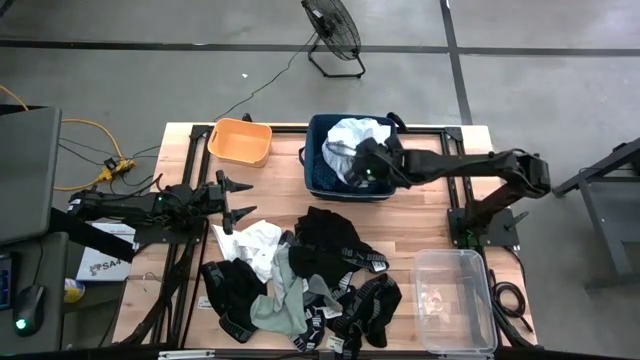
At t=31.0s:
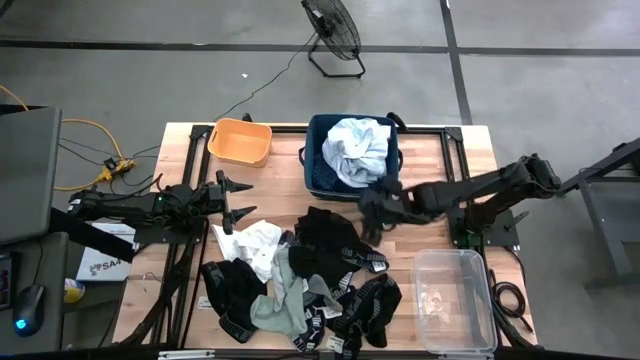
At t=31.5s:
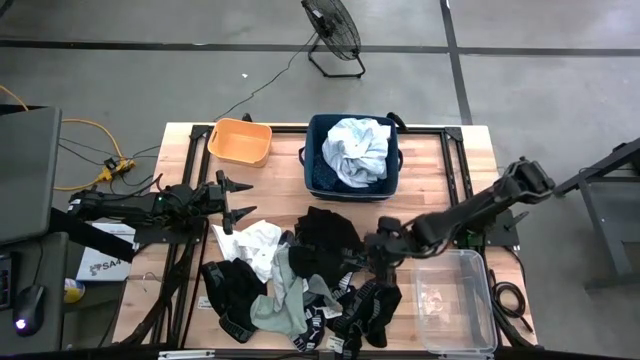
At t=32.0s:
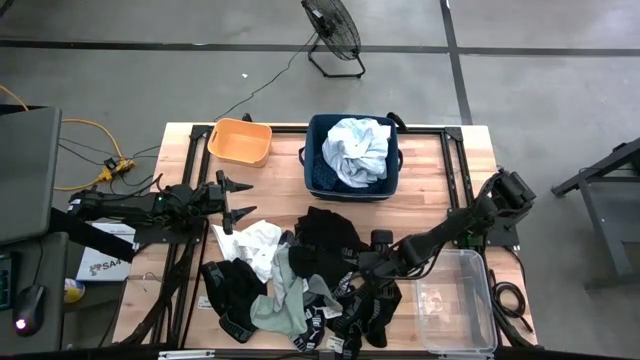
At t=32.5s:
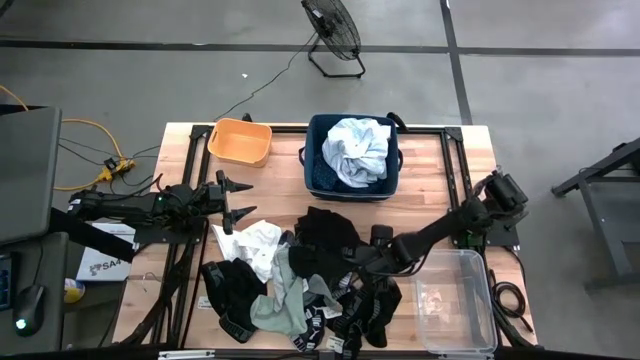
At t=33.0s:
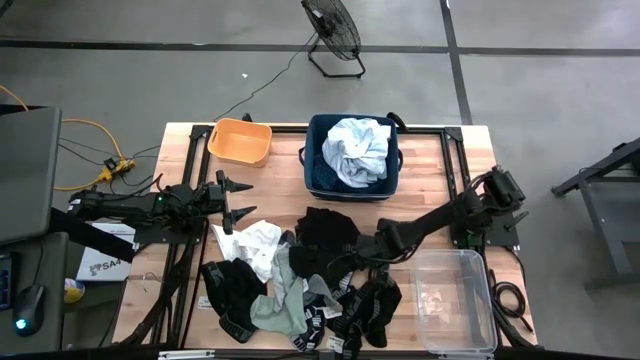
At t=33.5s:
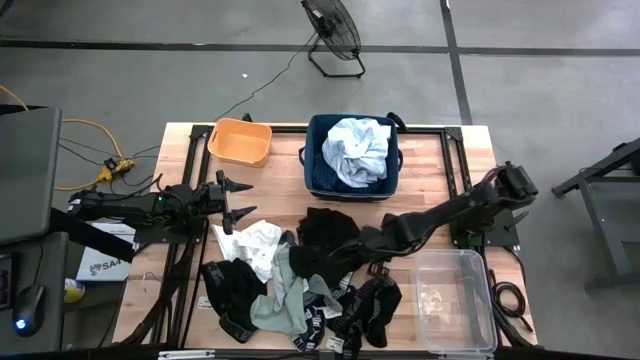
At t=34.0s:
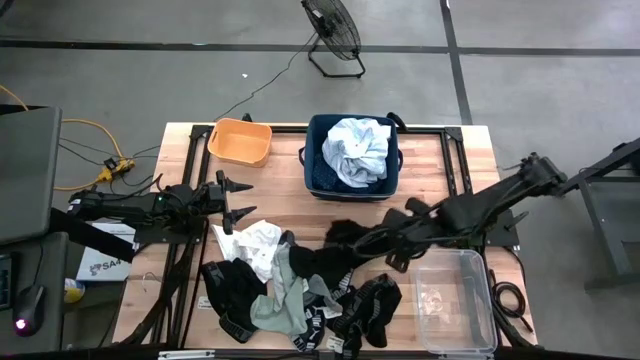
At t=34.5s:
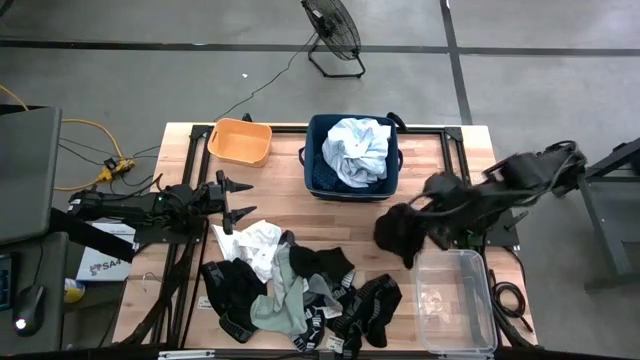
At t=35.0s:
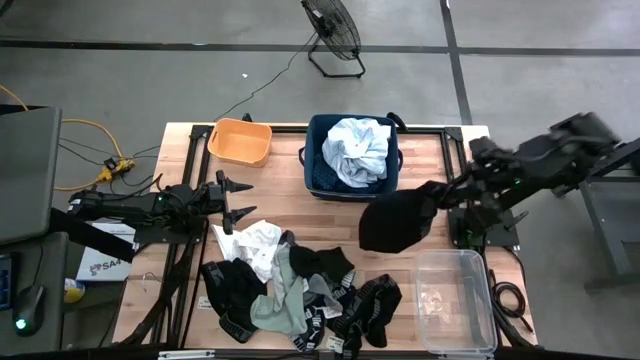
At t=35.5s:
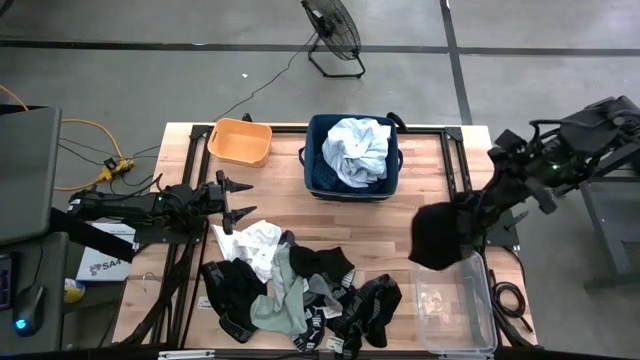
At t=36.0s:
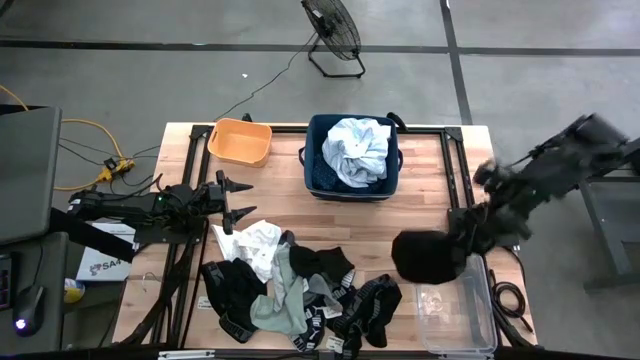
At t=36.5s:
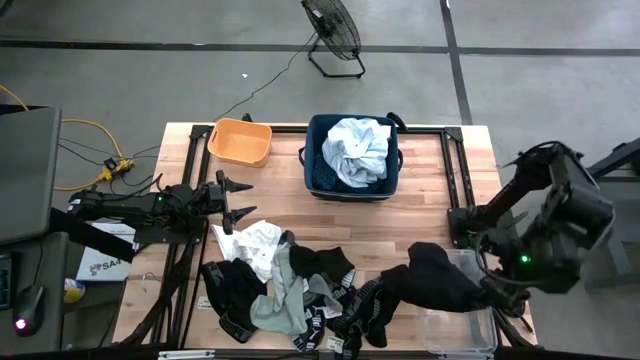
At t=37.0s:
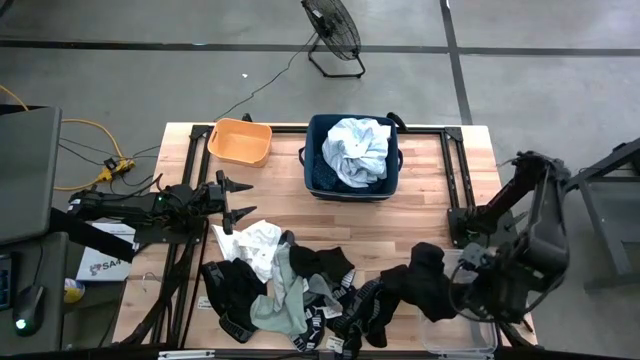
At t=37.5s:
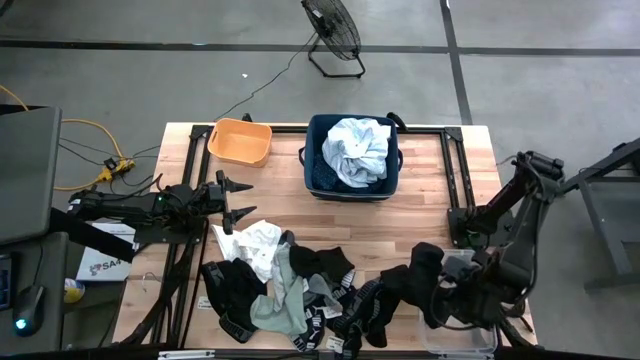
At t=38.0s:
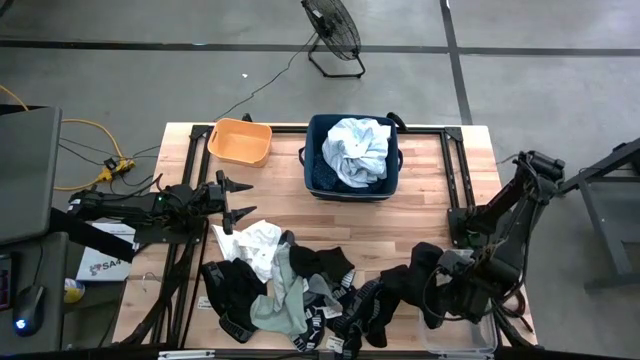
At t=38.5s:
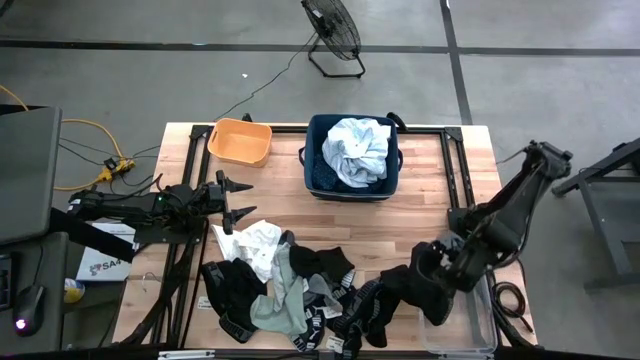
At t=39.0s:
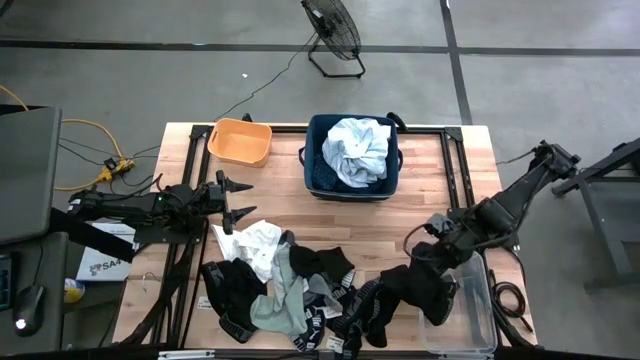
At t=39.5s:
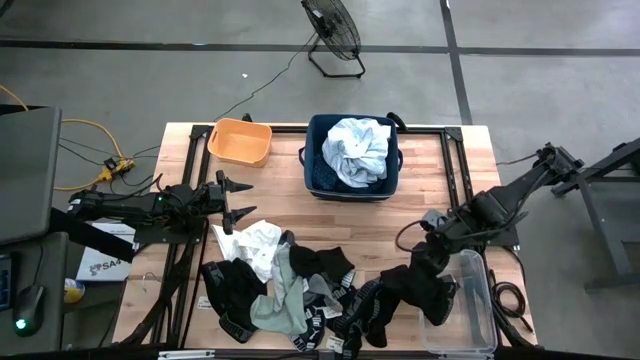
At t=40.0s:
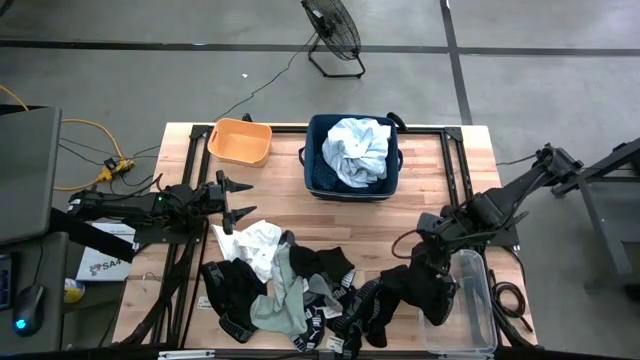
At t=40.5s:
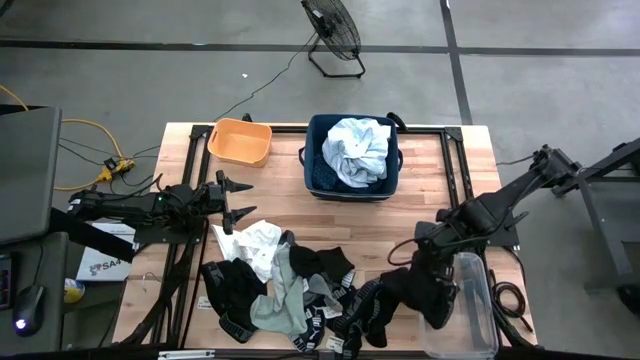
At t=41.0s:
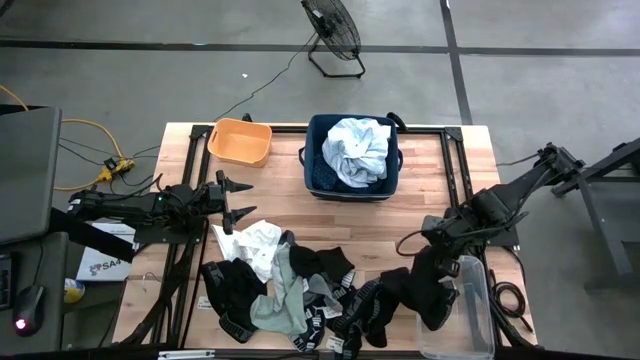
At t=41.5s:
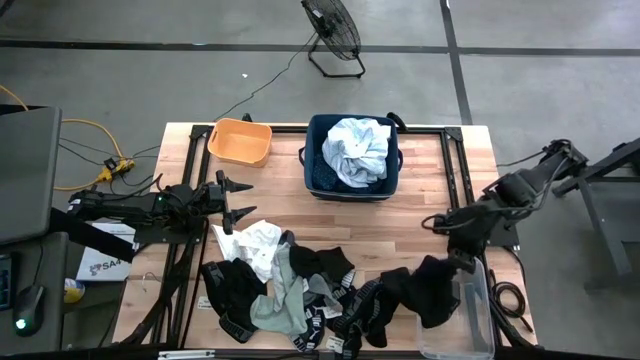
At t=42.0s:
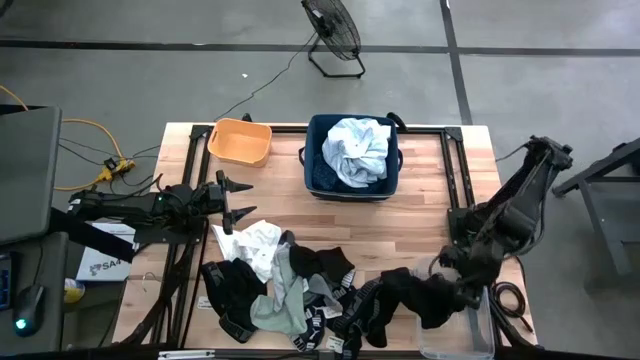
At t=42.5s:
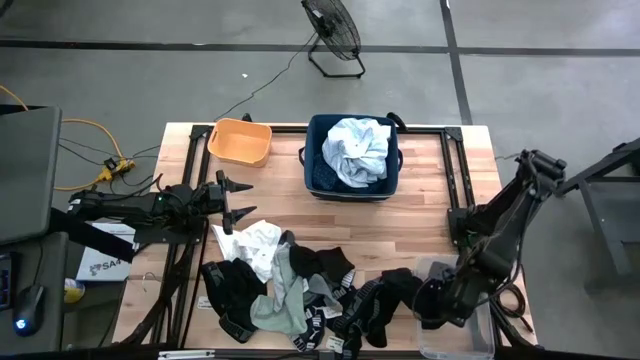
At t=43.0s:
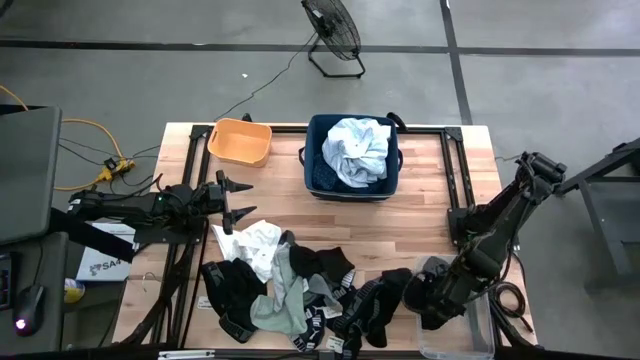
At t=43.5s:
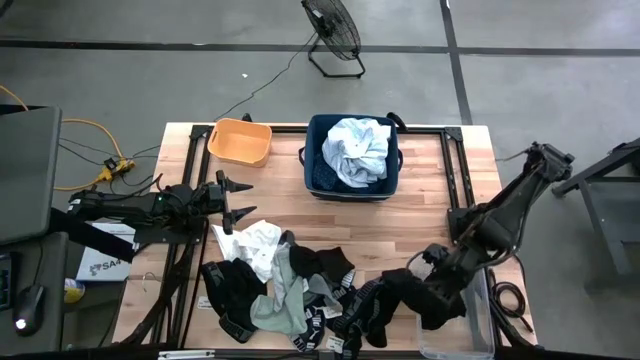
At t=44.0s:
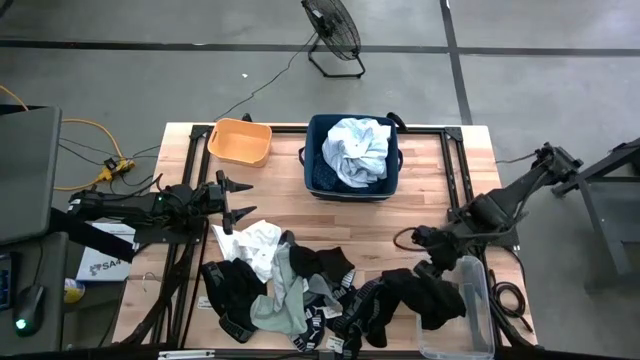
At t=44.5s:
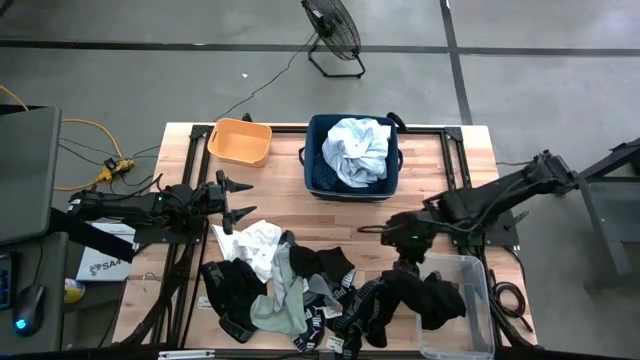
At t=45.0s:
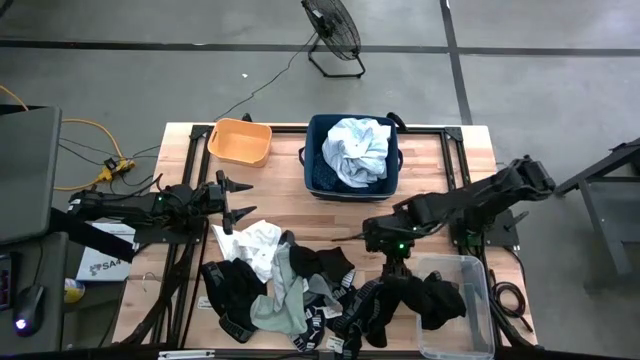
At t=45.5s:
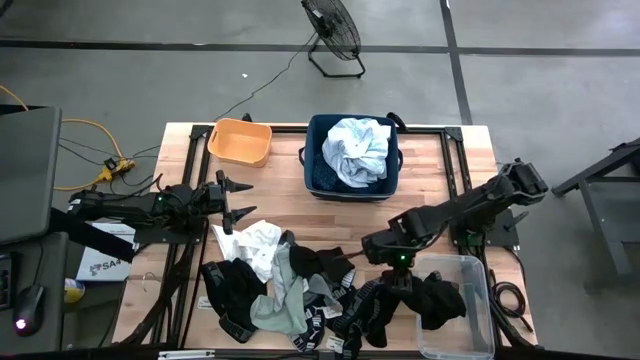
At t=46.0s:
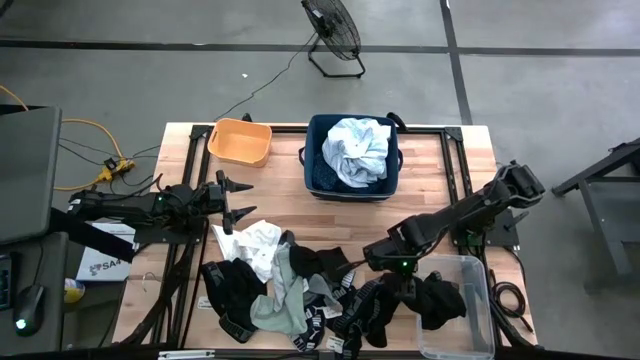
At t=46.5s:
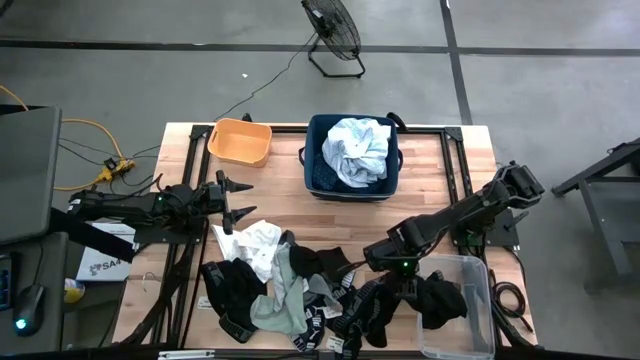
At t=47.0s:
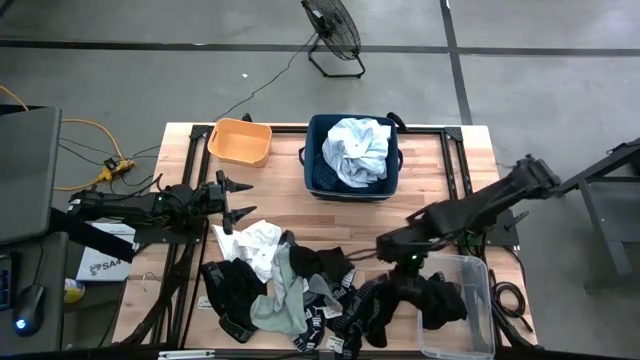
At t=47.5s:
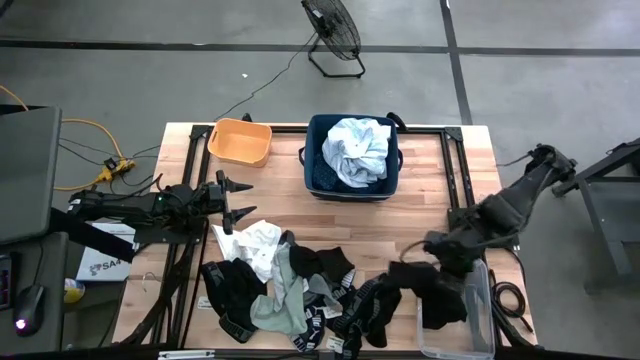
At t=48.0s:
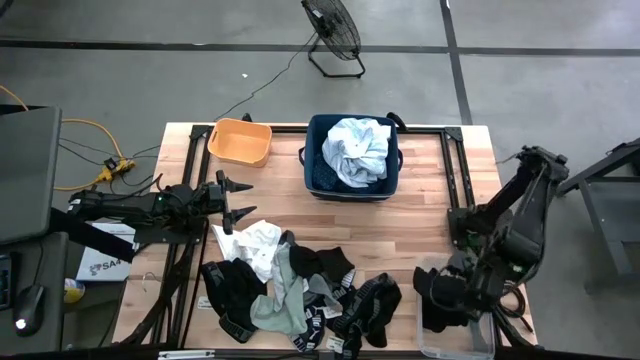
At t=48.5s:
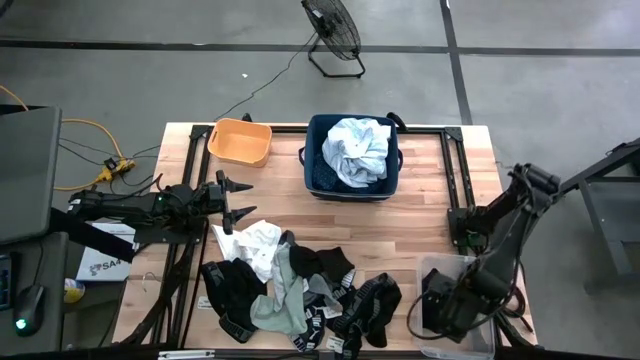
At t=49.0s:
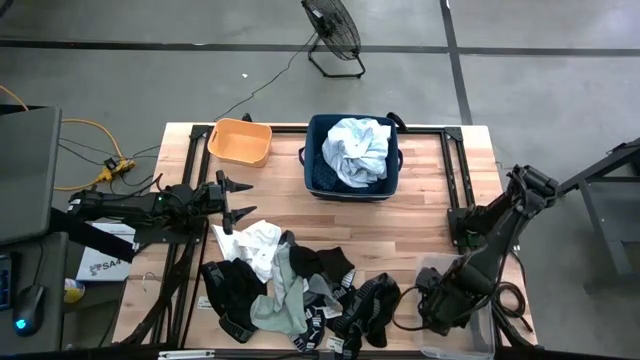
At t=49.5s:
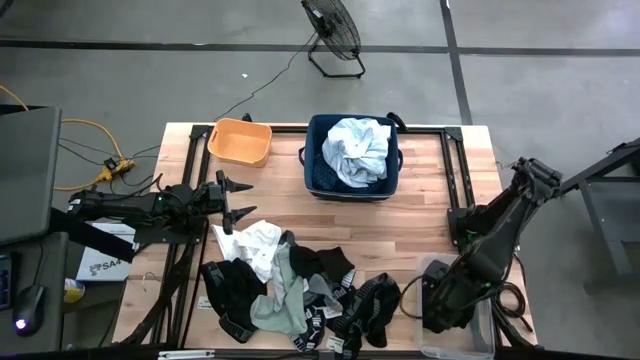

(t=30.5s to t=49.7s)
Task: Pick & Place Cloths
Put the black boxer shorts into the transparent bin
